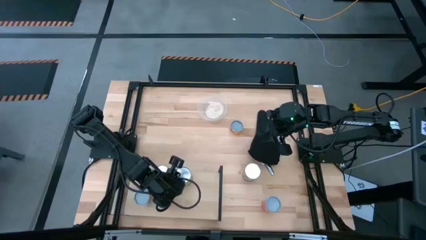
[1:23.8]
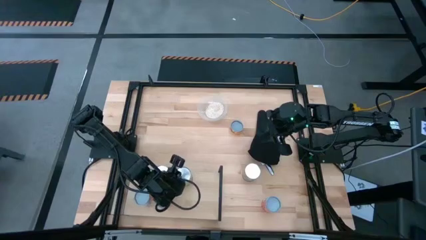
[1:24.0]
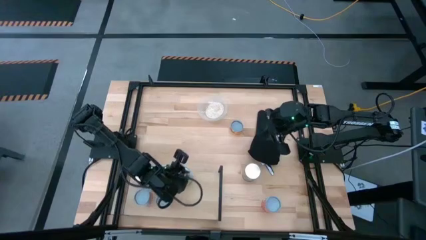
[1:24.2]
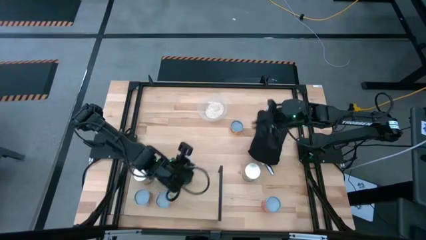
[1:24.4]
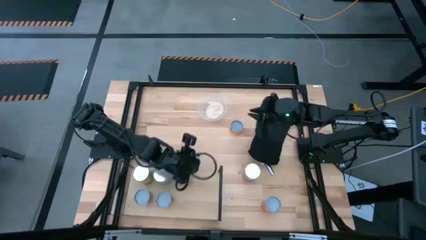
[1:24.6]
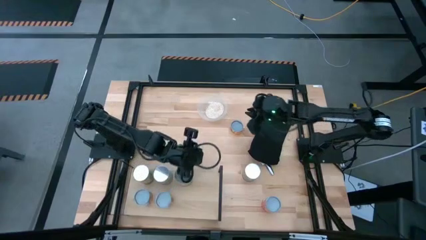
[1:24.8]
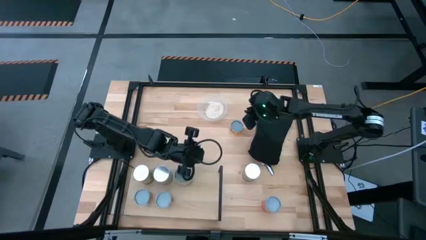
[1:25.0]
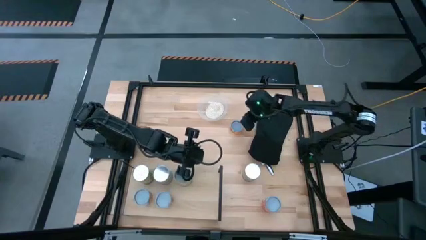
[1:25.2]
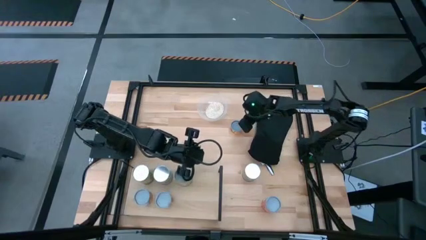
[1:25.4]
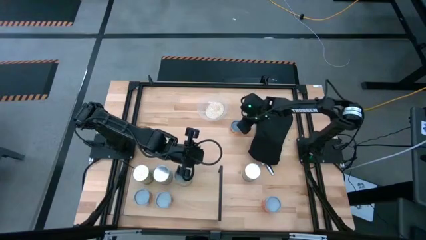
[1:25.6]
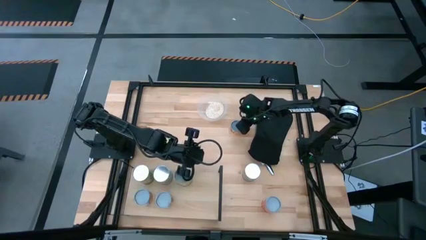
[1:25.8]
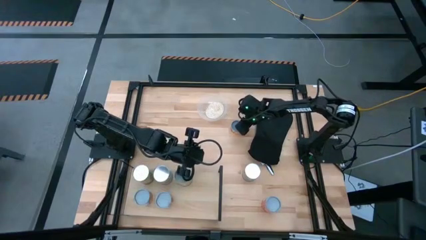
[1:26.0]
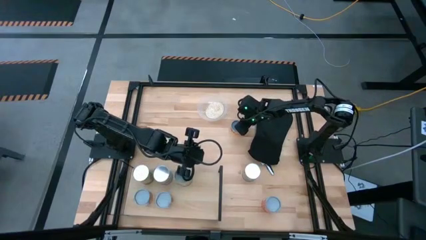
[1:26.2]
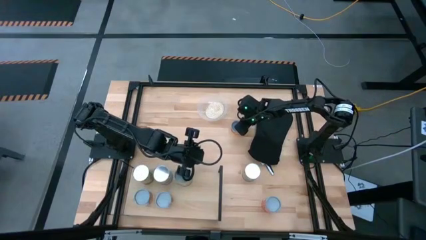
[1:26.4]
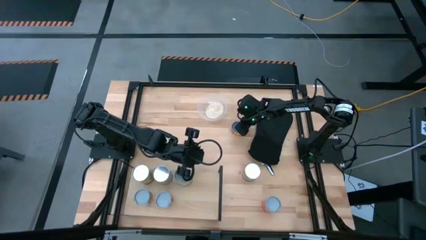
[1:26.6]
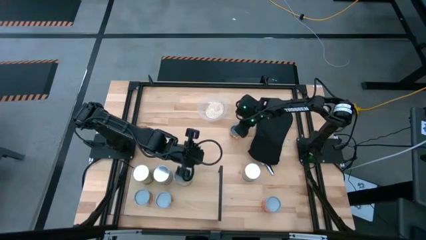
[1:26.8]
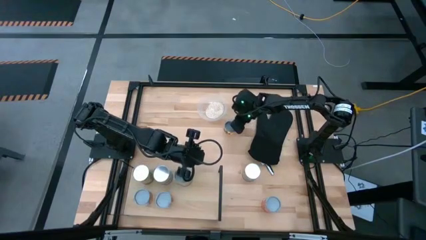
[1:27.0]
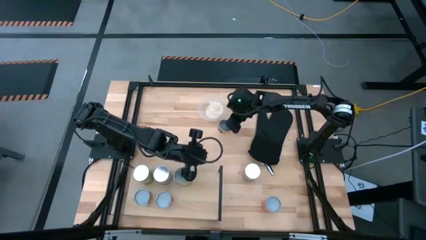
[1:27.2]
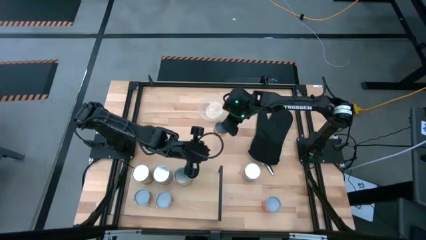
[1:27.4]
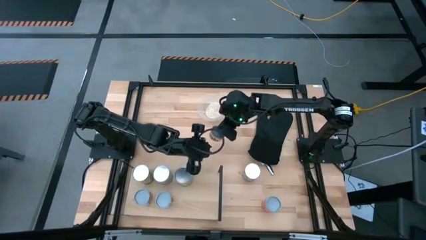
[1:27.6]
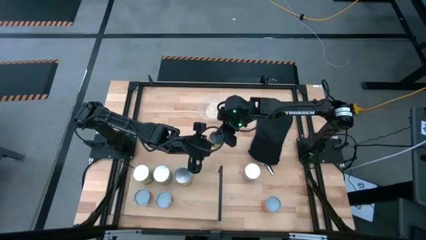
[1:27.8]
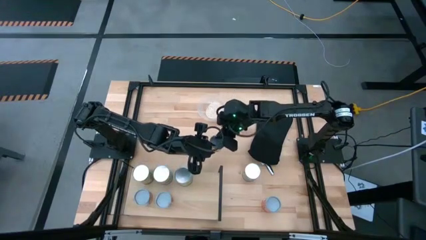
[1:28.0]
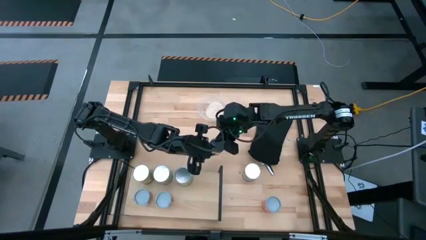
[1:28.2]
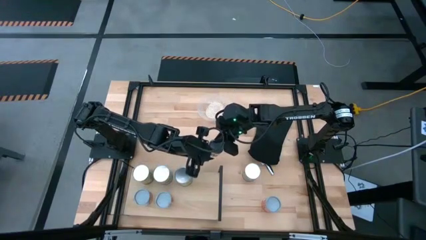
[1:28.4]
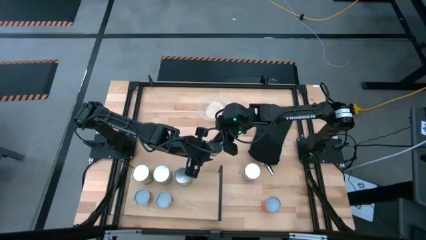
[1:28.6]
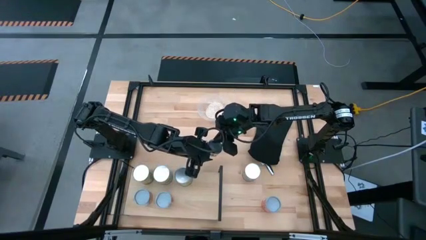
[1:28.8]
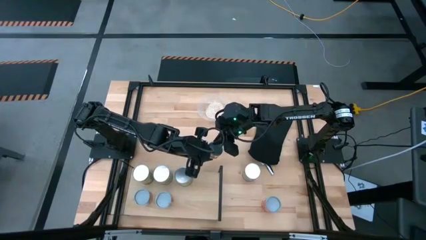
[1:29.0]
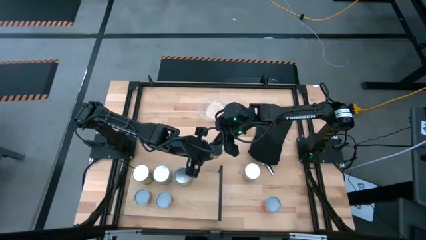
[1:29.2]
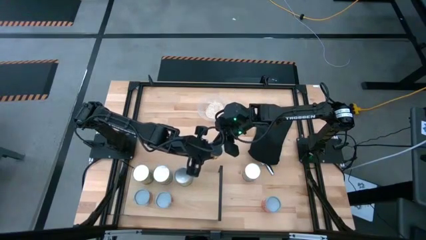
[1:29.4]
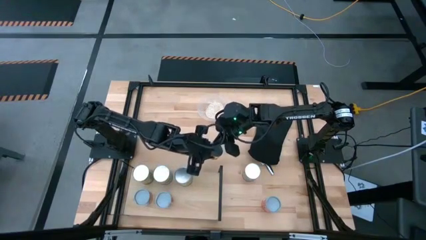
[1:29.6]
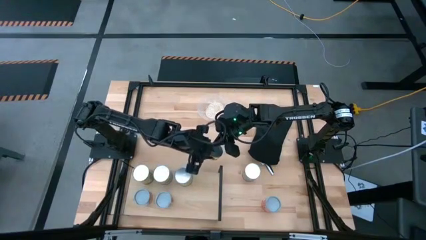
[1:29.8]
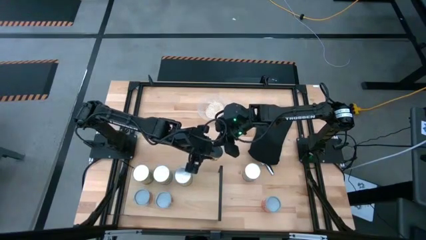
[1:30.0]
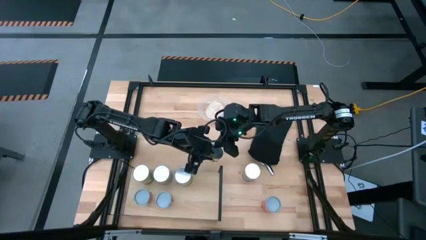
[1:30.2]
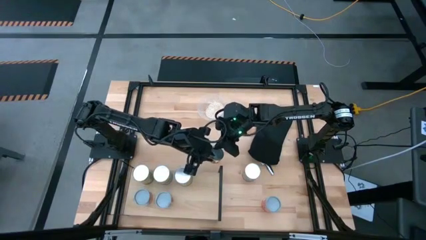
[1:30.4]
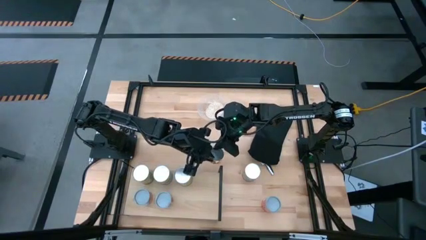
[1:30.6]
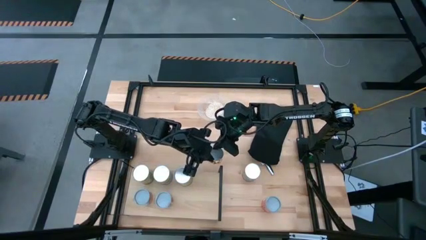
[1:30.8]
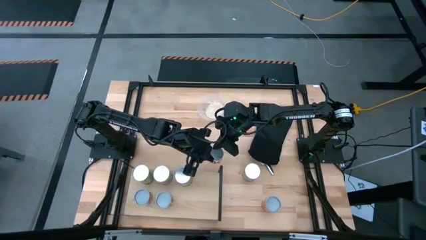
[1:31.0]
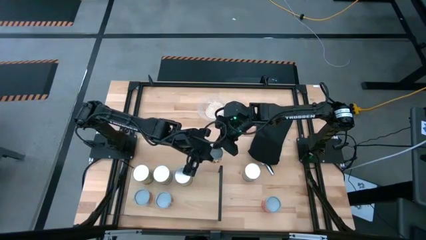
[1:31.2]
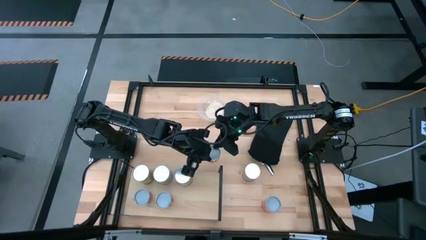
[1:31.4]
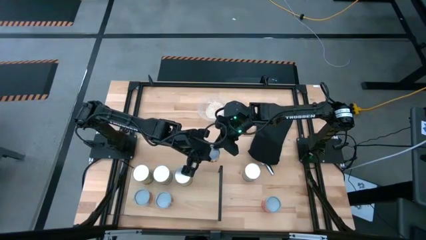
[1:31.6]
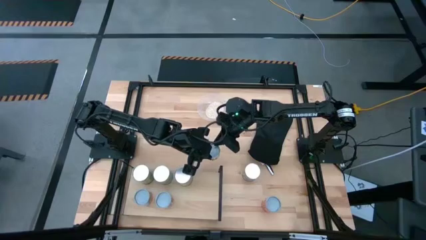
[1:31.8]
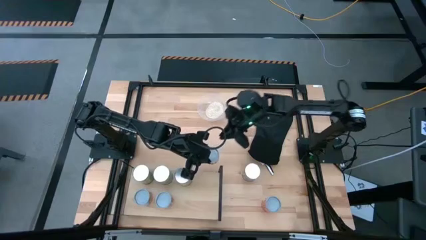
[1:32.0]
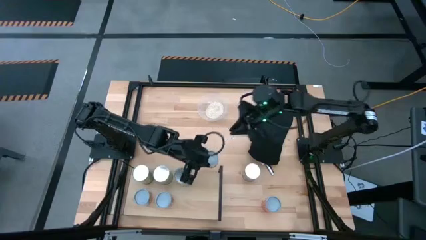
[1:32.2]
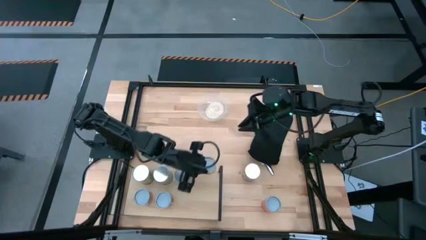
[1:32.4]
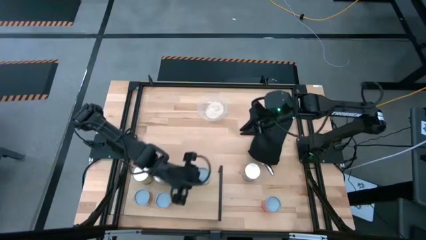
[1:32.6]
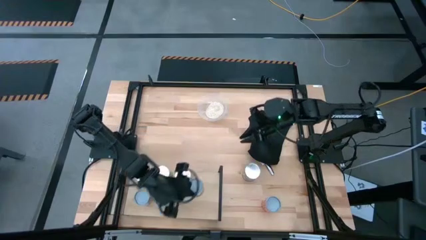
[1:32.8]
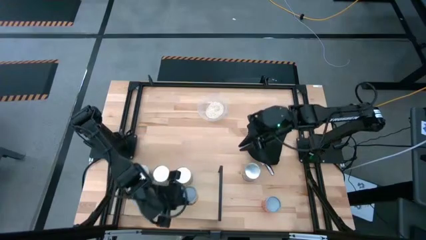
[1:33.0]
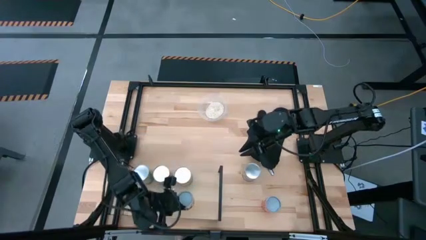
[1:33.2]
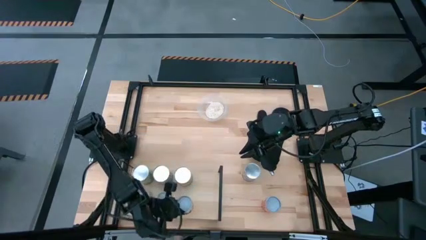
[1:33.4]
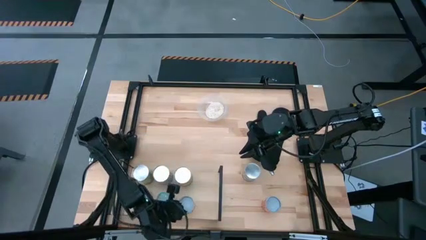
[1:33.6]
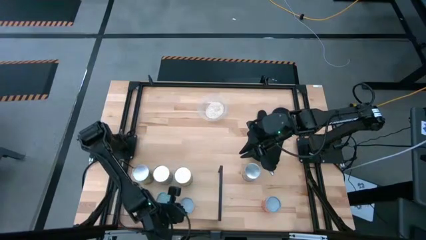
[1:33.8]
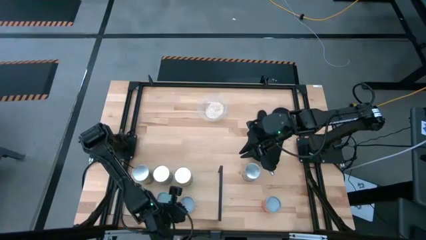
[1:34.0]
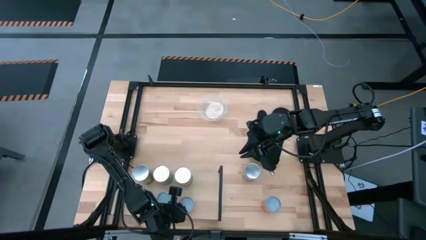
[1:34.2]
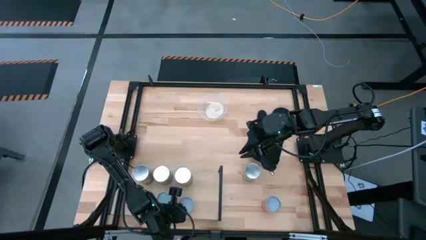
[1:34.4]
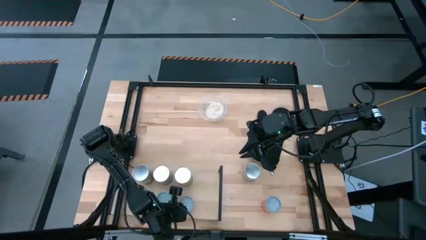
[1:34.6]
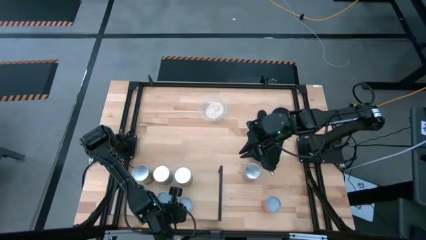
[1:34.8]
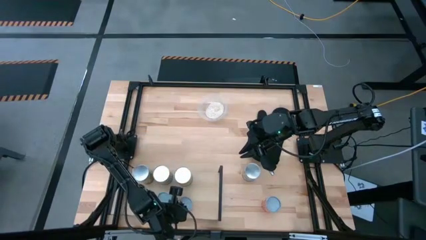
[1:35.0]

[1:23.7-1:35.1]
Task: Pick and place cans onto a shelf
Put the top yellow canned pineapple on the shelf aligned with the other green canned pear
